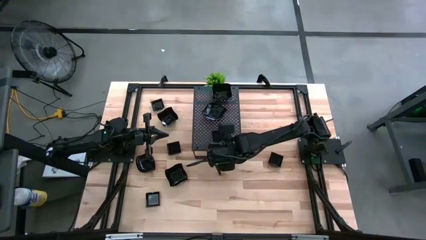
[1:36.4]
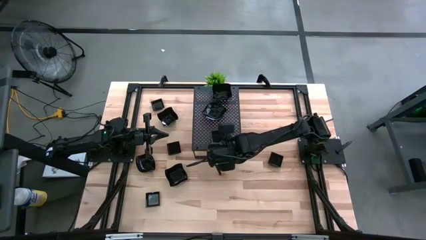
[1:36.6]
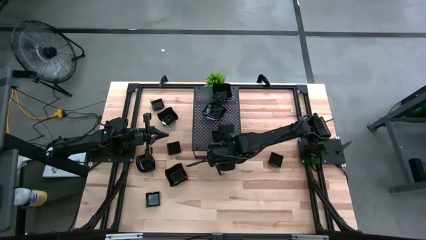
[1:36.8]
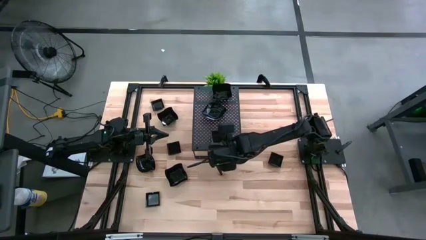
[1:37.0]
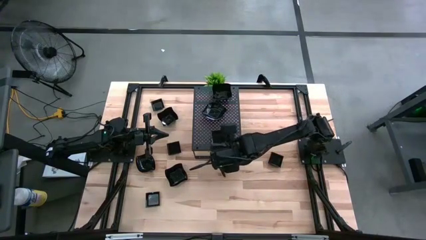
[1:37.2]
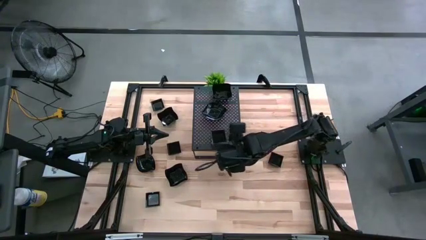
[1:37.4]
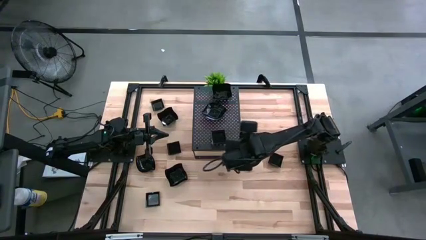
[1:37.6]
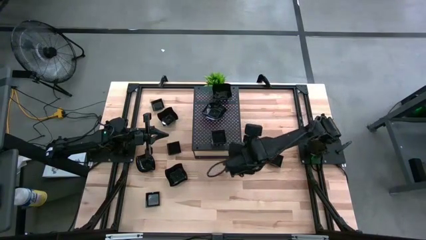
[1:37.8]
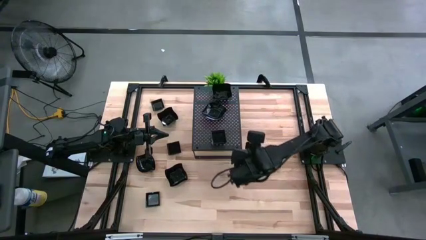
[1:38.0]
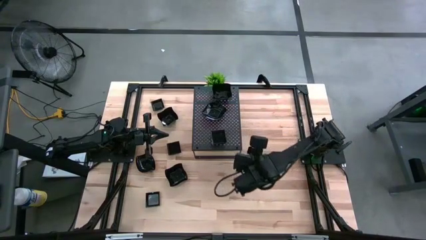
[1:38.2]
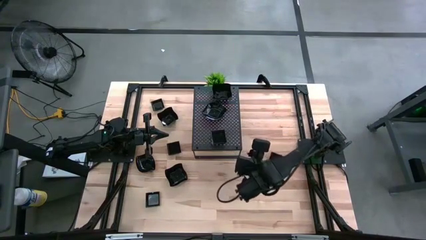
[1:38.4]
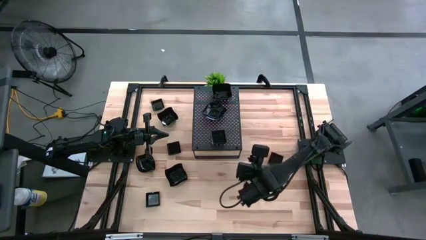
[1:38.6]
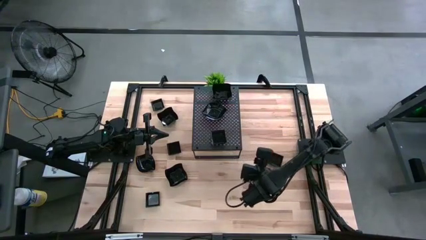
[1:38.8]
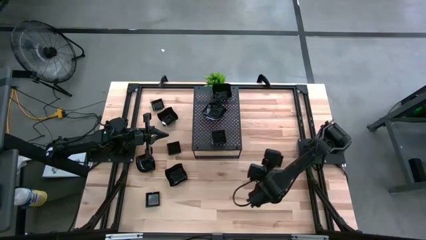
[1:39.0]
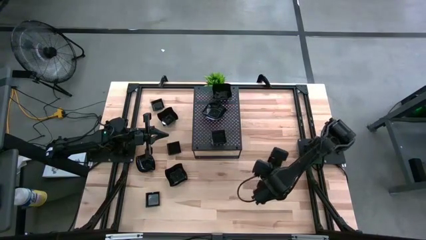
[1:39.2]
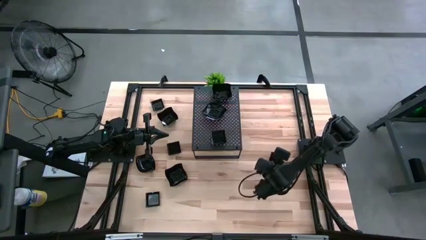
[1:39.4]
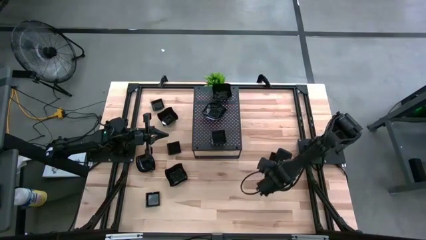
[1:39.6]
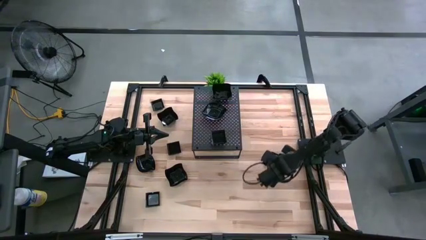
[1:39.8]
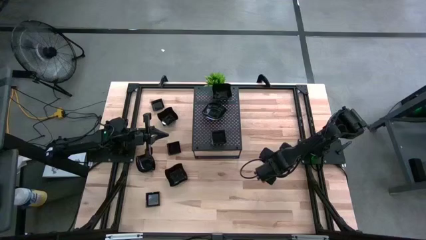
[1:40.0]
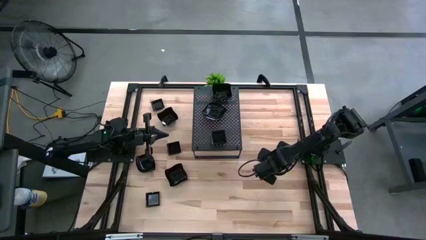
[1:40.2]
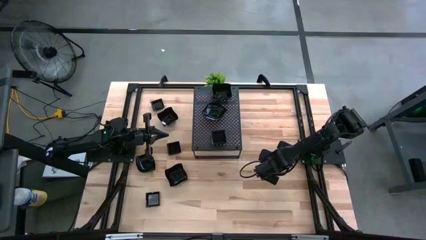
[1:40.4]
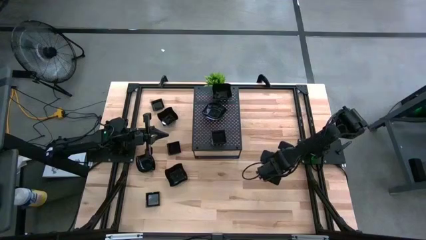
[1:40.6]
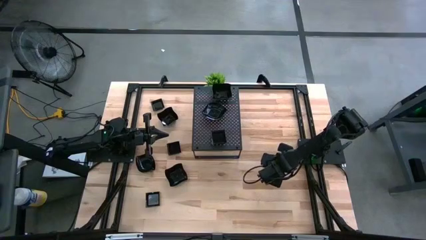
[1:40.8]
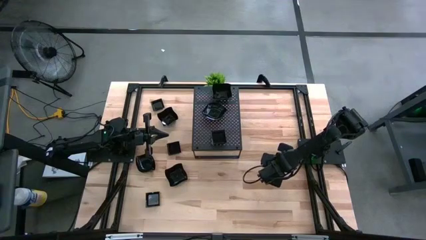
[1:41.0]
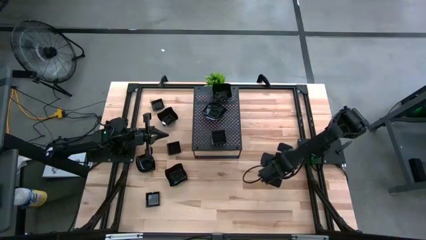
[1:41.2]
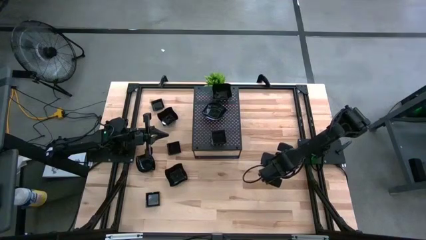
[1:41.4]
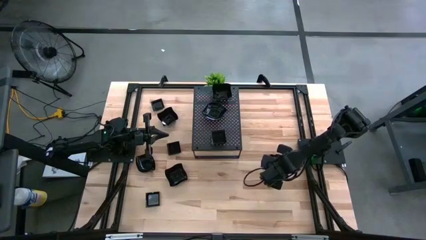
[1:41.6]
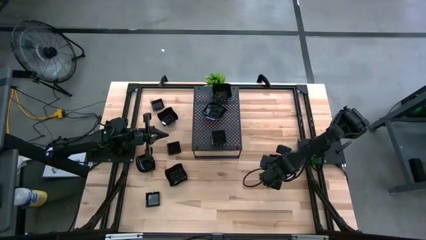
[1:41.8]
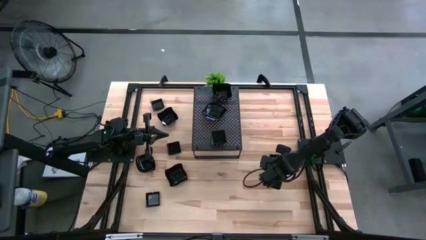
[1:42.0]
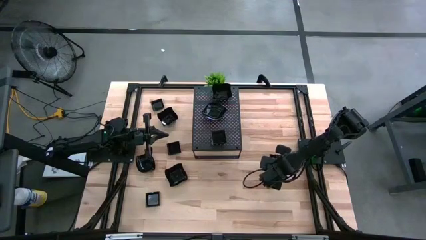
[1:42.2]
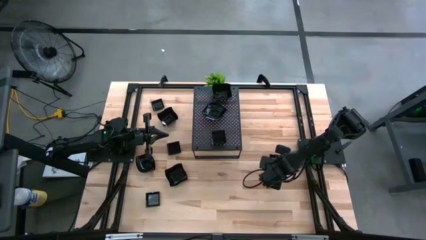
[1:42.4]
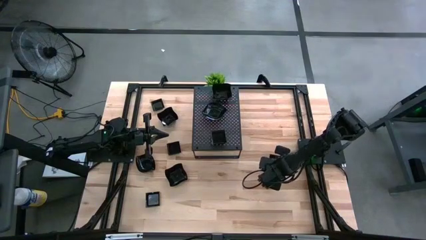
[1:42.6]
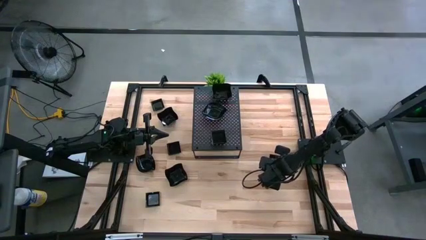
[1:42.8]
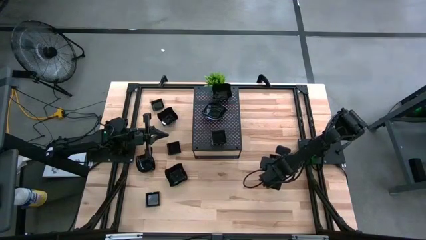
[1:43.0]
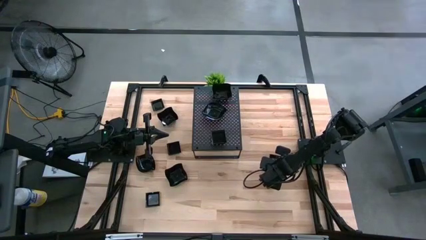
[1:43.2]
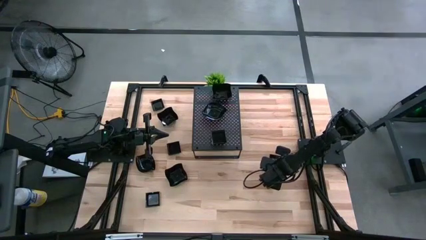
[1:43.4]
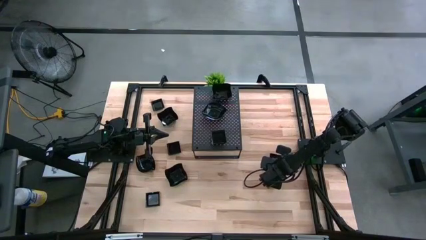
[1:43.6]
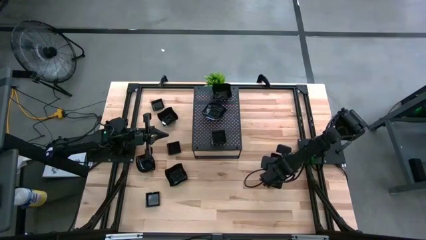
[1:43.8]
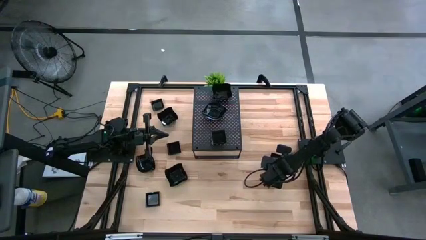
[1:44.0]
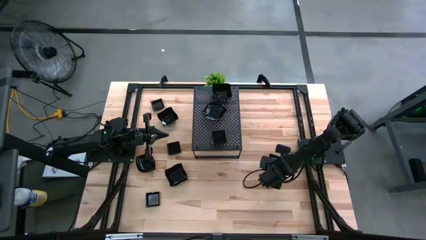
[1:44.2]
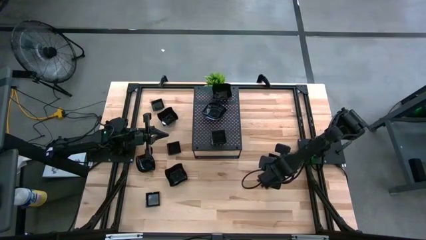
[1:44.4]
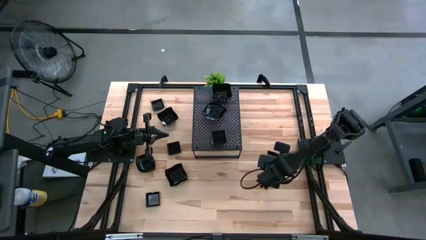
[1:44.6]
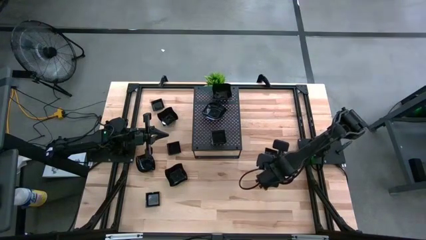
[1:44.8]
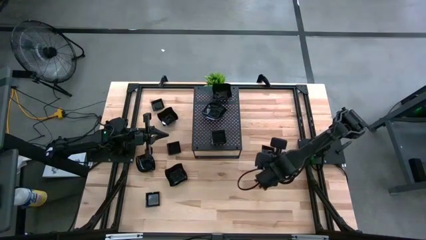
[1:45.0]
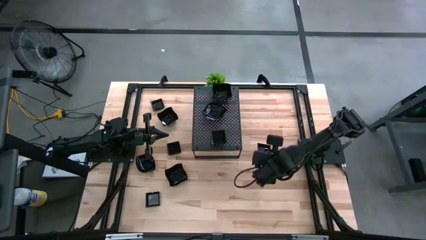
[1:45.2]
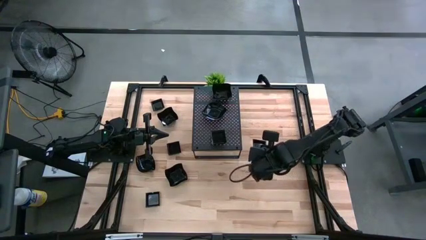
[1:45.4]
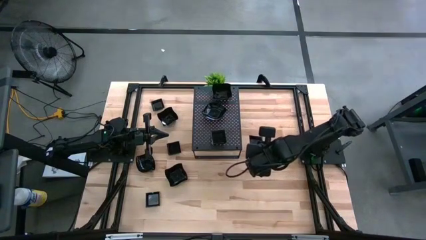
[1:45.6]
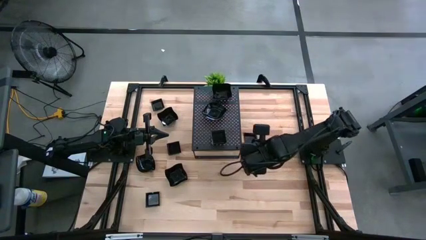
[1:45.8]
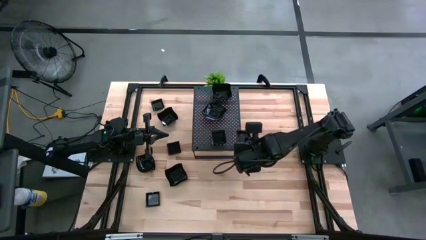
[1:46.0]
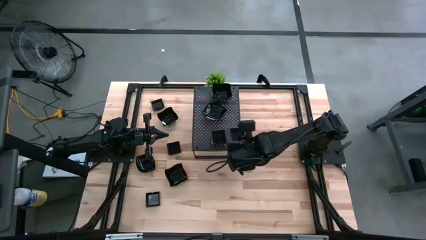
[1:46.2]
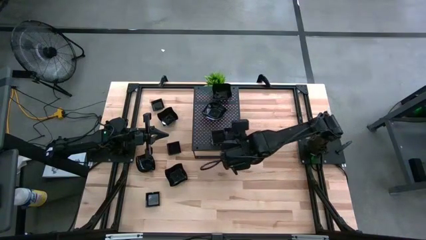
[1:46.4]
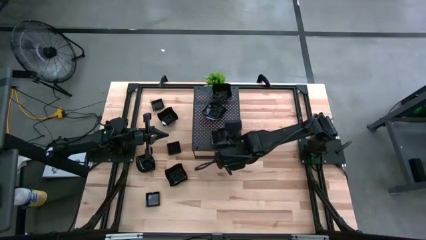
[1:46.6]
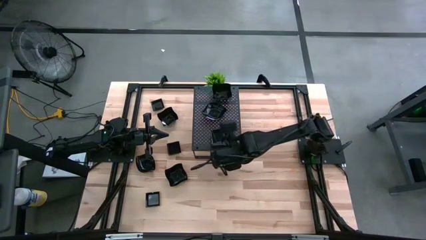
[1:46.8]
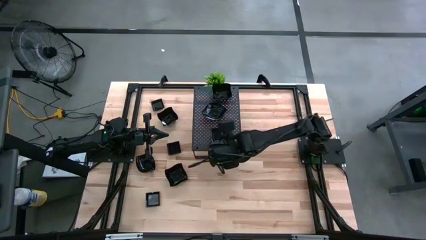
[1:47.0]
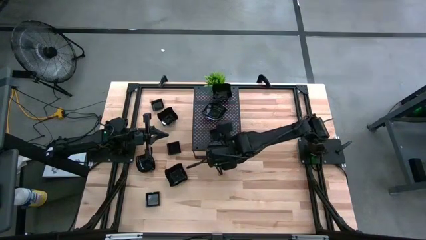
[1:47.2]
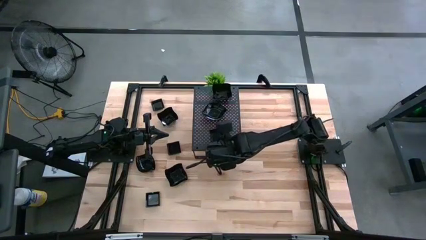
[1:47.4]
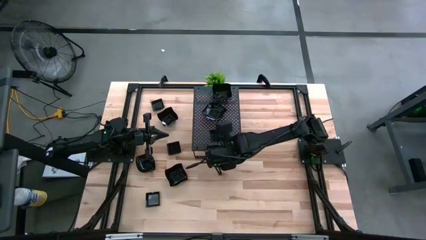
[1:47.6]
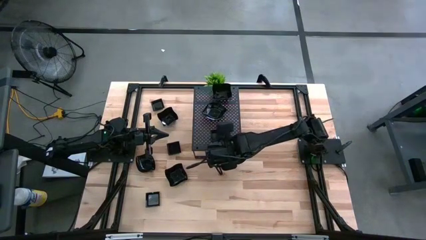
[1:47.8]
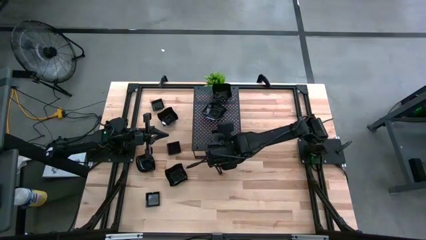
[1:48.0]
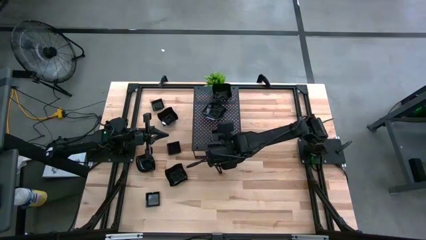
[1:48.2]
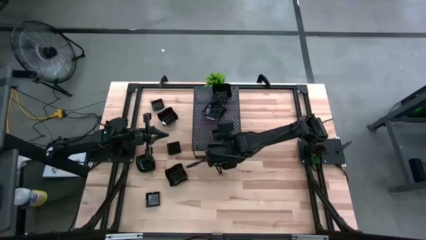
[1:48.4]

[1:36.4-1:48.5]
Task: Pick & Place Mini shaped plates
Stack the square plate on top of the square plate on the shelf

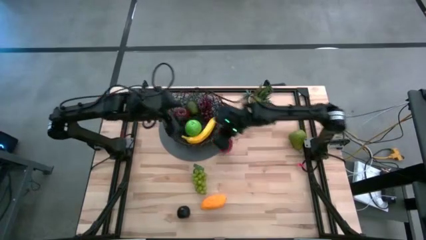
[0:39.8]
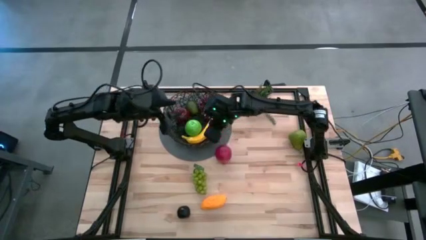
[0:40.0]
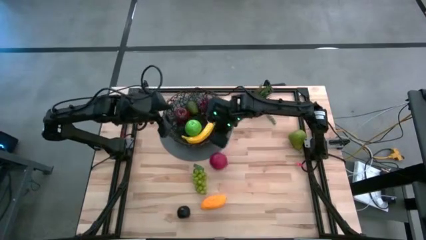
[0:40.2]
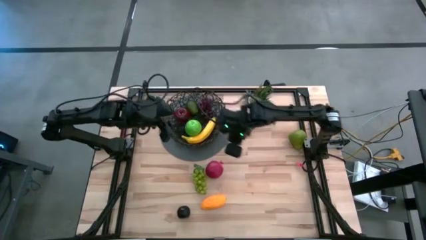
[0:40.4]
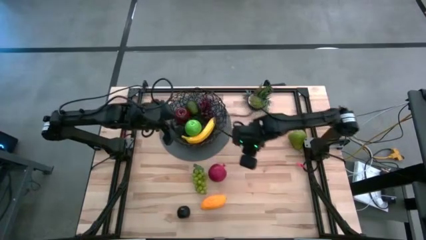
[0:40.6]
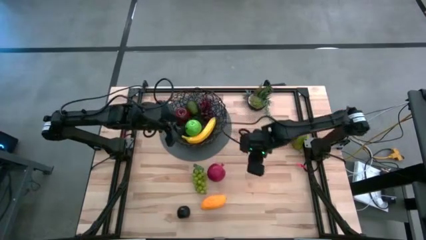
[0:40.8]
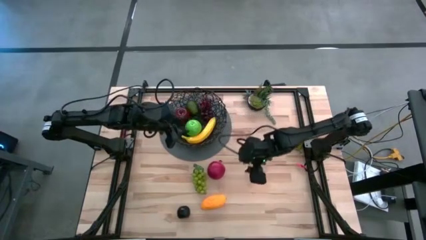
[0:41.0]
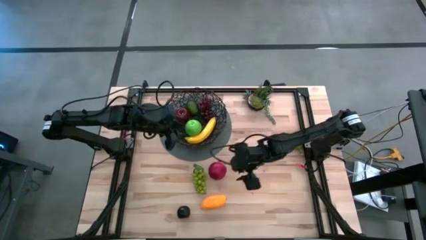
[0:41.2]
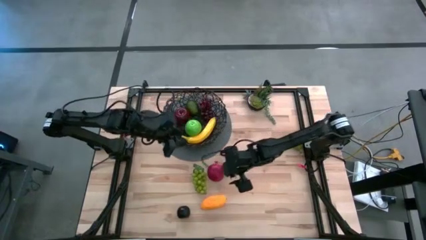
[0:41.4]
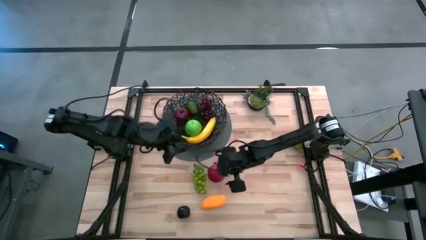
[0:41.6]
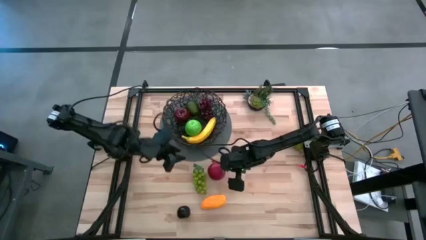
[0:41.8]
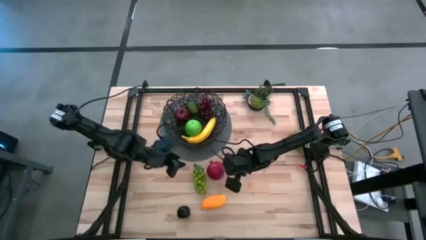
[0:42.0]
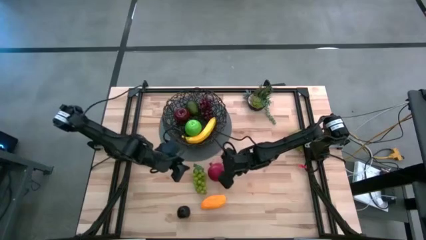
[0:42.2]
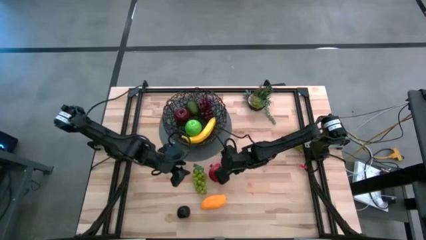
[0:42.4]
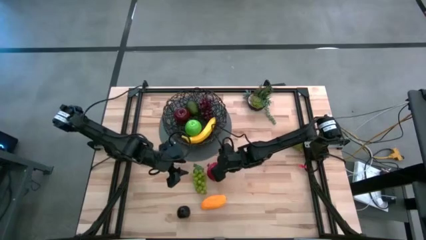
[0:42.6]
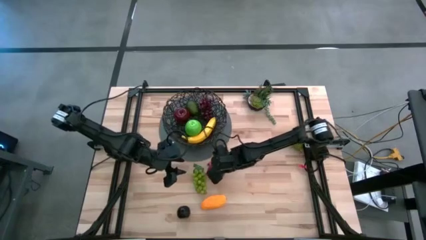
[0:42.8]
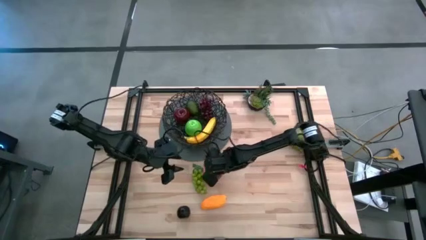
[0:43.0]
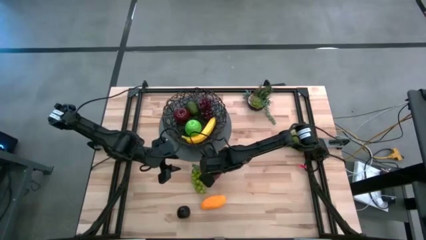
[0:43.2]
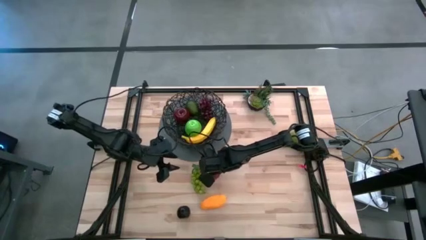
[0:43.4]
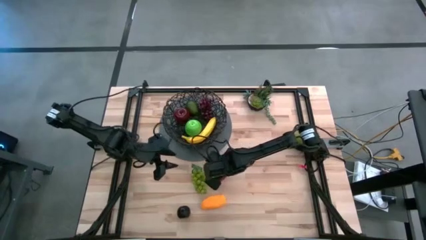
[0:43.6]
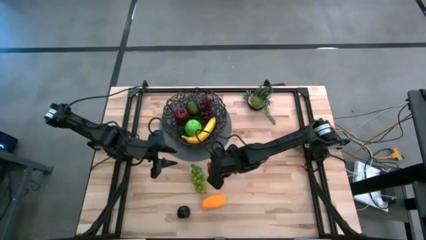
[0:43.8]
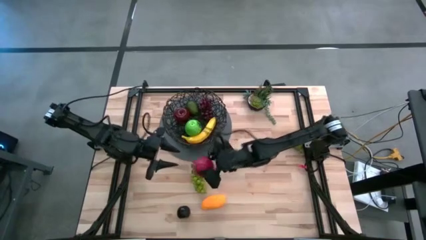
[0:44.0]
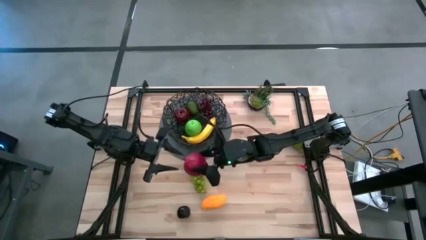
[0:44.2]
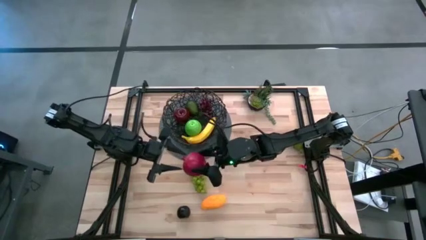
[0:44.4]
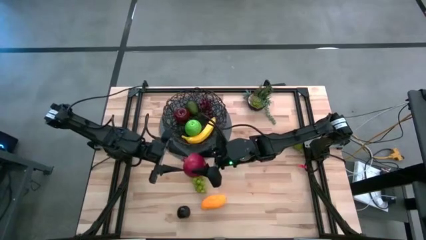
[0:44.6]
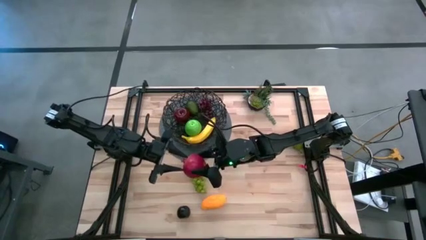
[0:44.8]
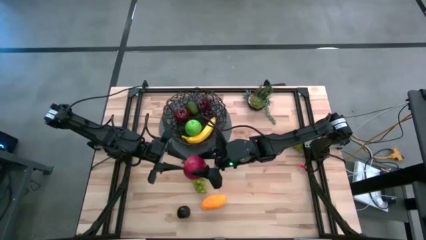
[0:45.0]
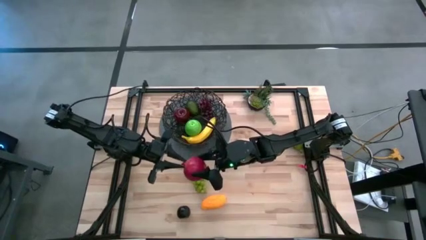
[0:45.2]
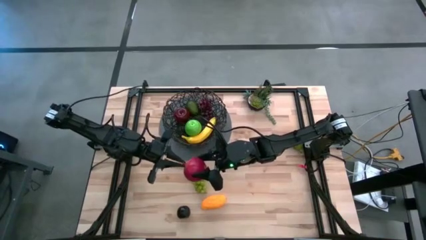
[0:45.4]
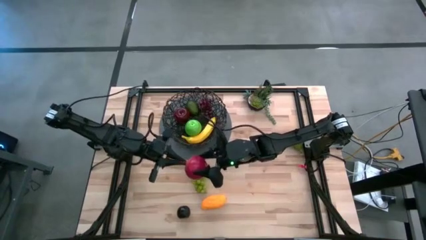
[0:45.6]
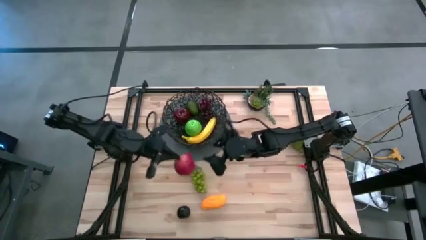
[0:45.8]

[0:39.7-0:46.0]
Task: Build produce basket
Put the red pomegranate into the black wire basket
